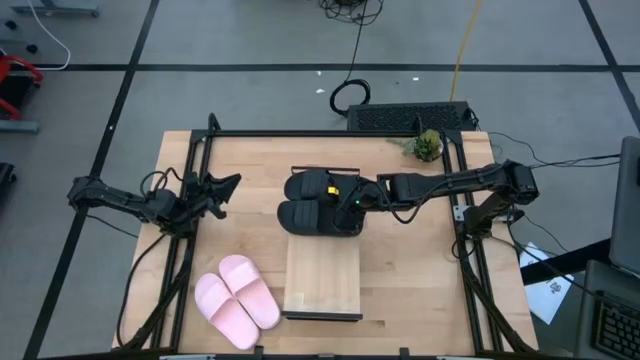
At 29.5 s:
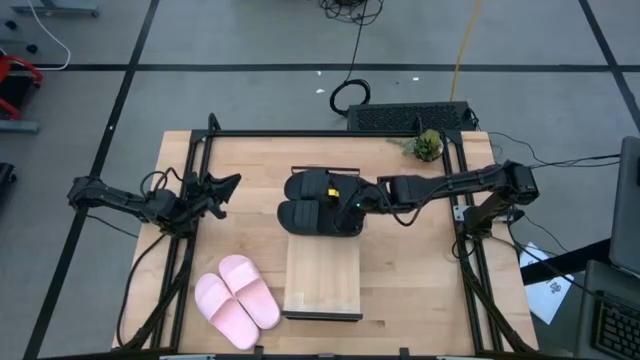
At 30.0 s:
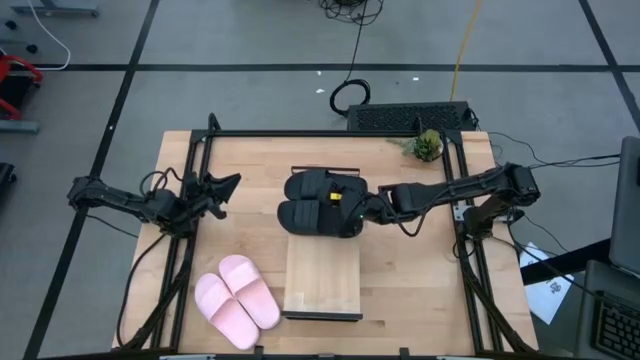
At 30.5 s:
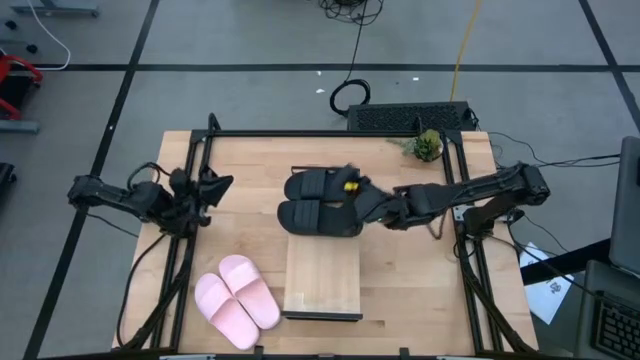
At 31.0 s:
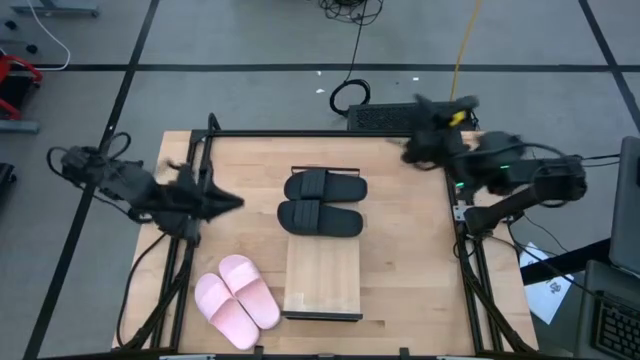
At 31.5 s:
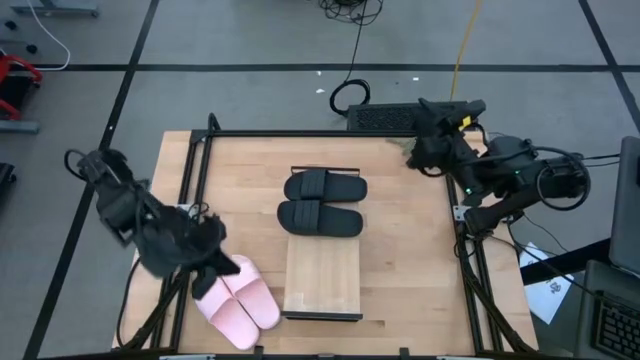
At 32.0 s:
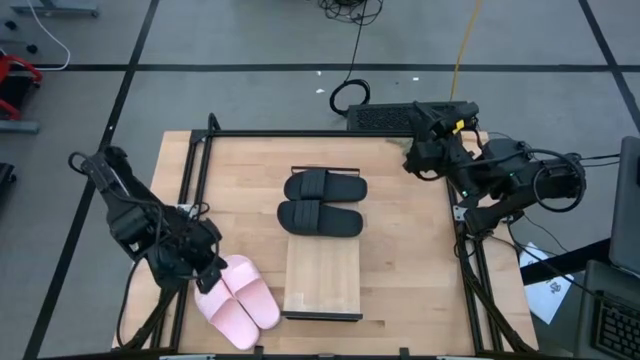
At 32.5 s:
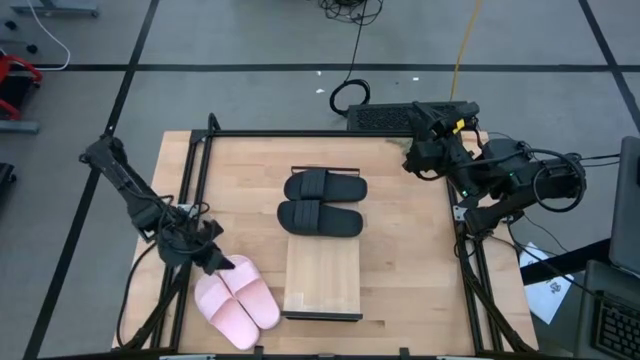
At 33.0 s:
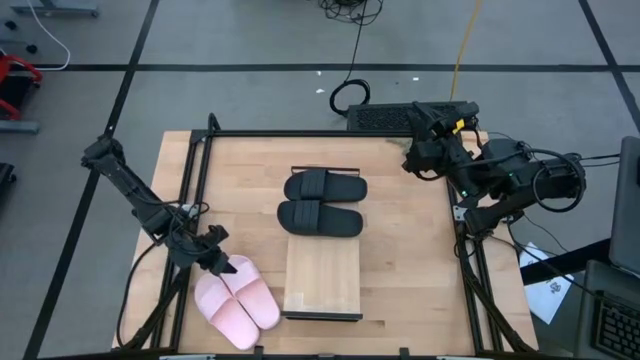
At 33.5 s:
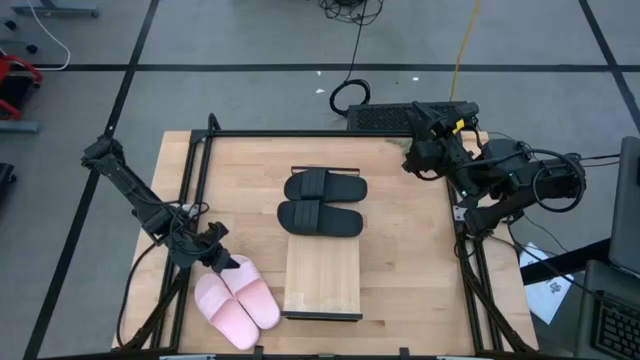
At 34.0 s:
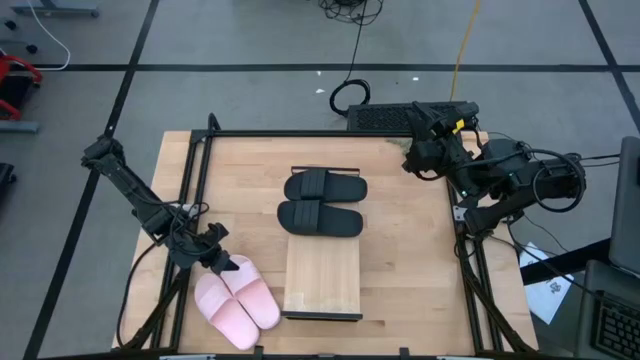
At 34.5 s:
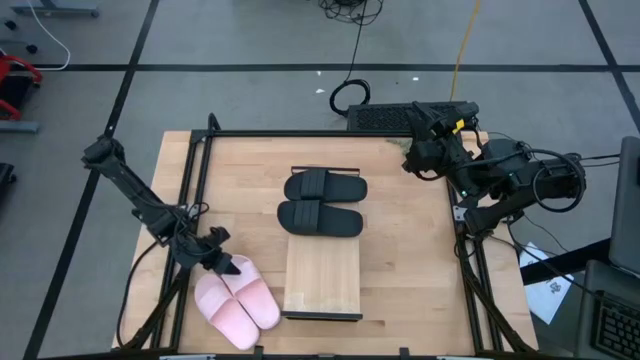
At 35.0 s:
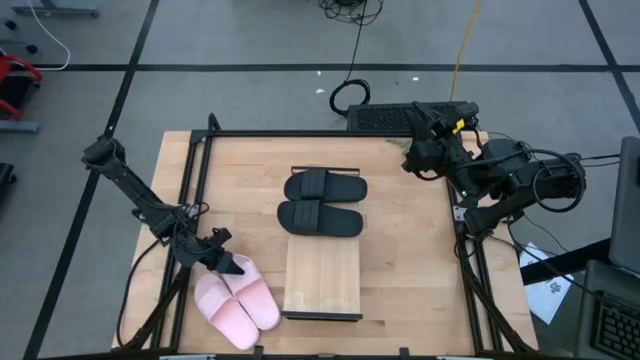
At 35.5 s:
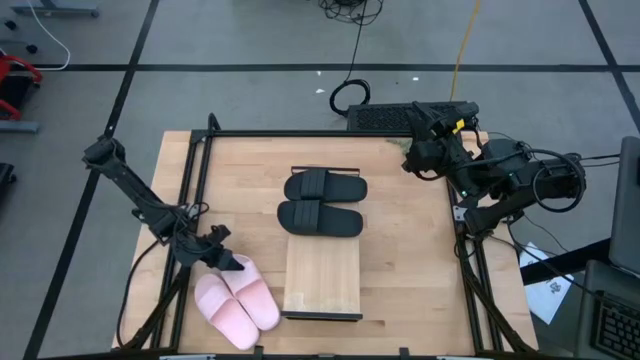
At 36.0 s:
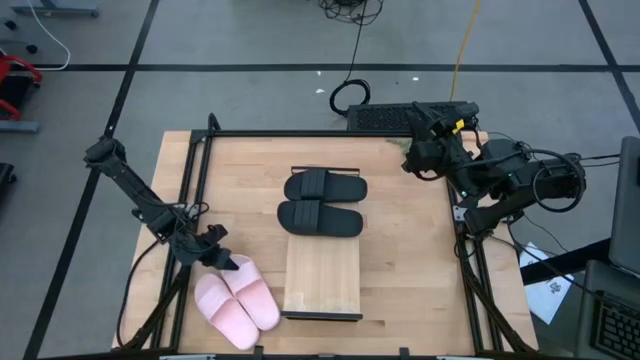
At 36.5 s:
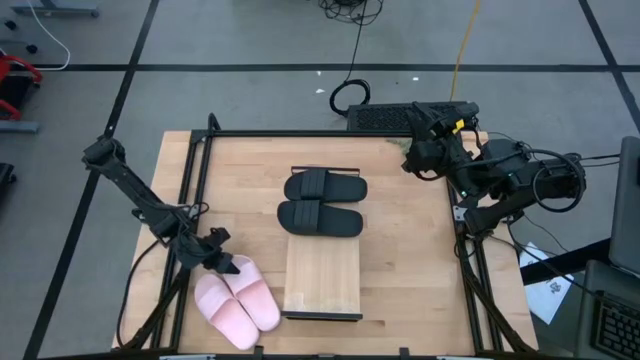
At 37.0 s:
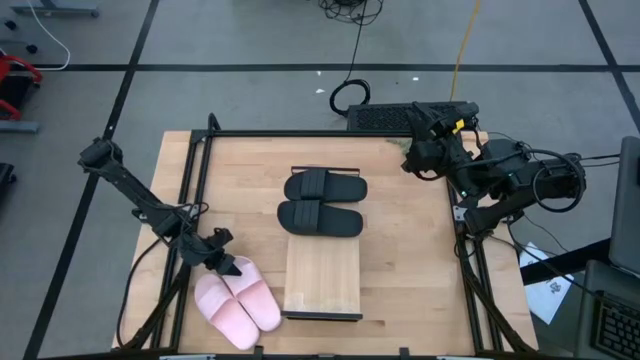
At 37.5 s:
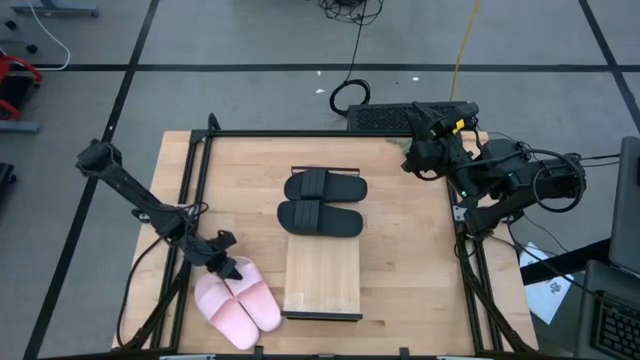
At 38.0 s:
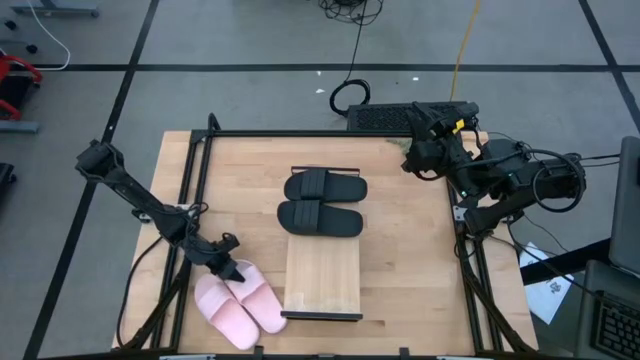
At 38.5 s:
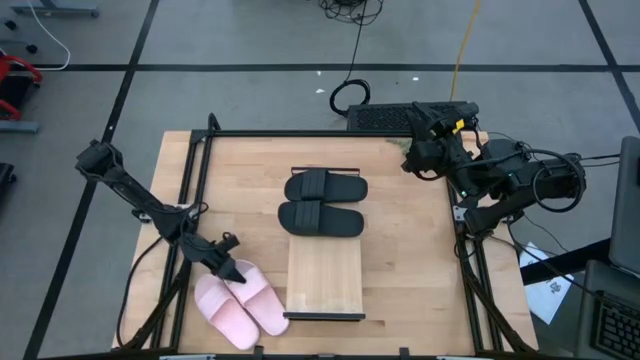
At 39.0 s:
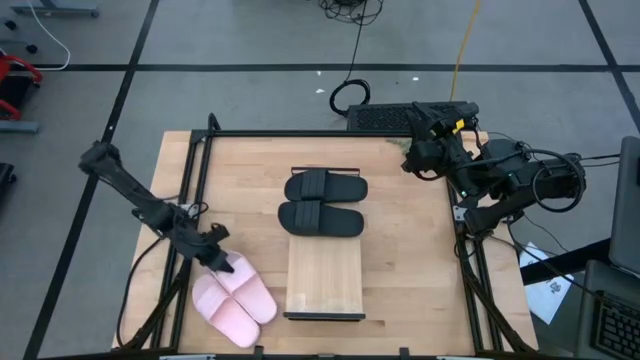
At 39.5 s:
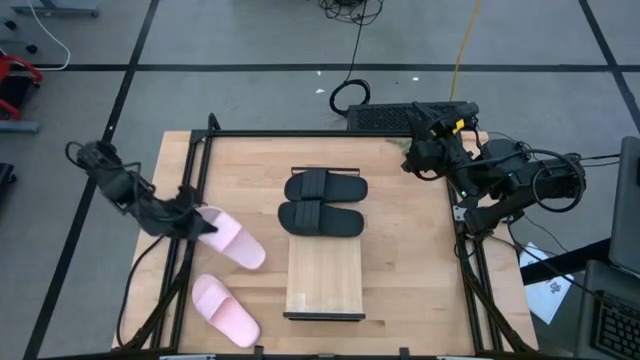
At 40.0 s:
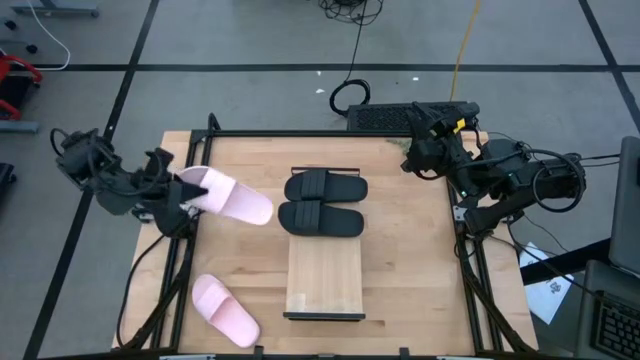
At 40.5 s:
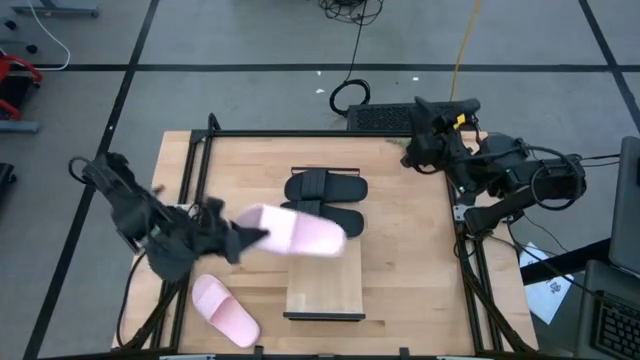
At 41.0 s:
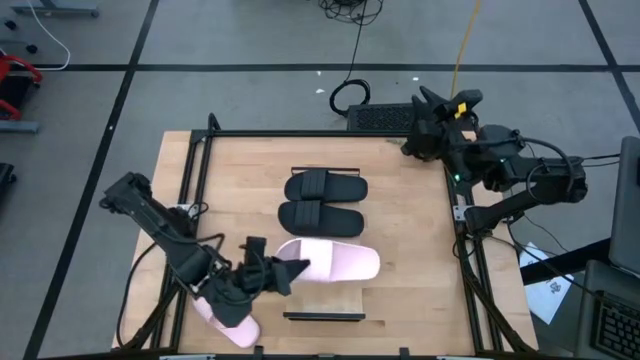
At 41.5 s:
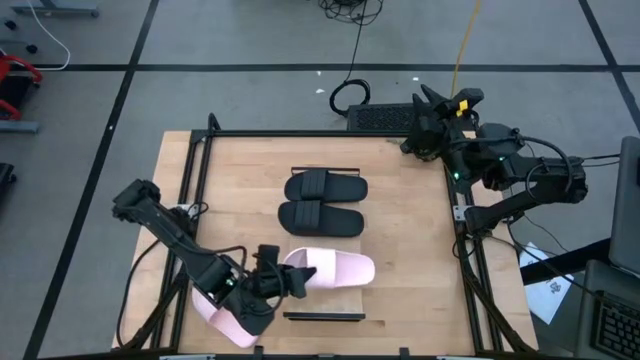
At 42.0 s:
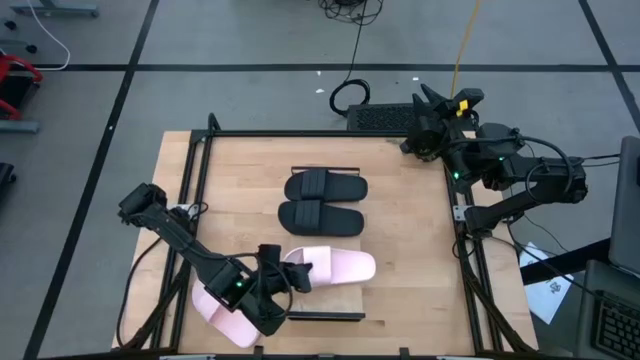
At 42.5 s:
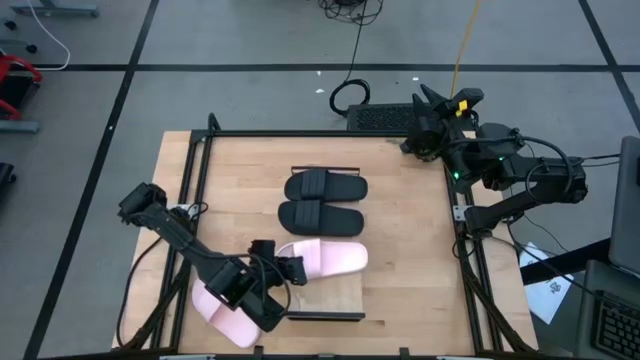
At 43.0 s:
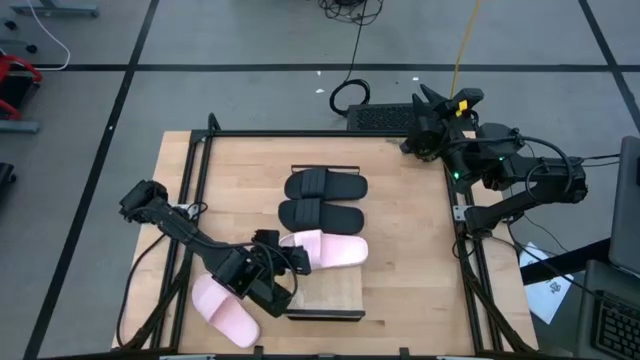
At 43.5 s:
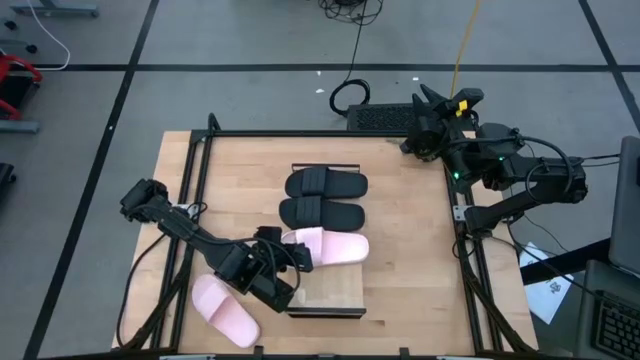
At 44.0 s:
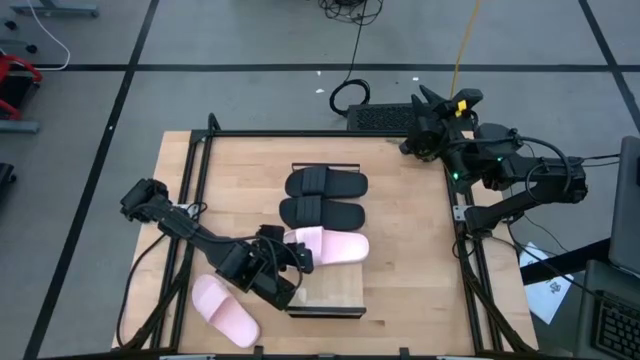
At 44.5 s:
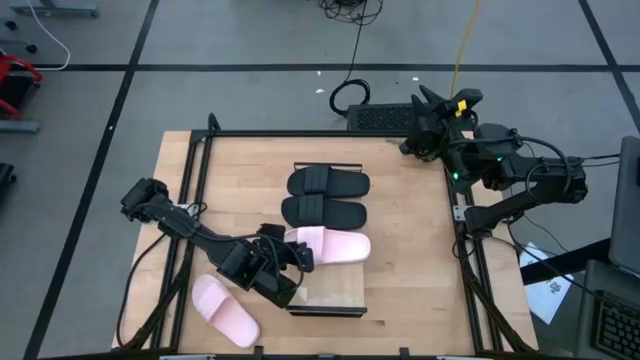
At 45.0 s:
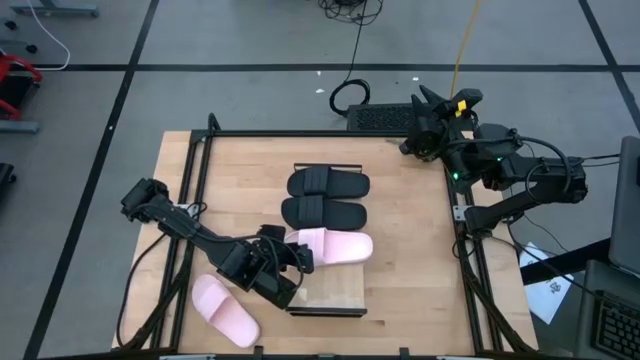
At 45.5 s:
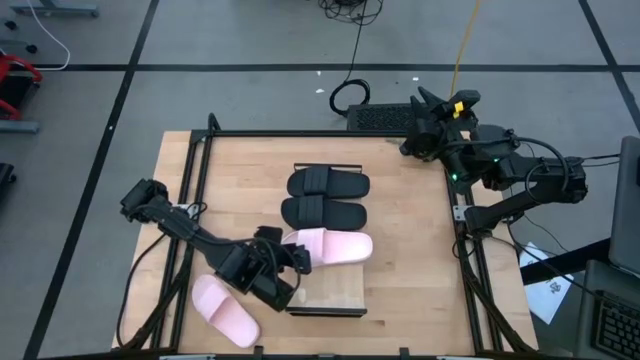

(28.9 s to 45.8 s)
Task: Pick and place slides into the shelf
Put the right pink slide on the shelf

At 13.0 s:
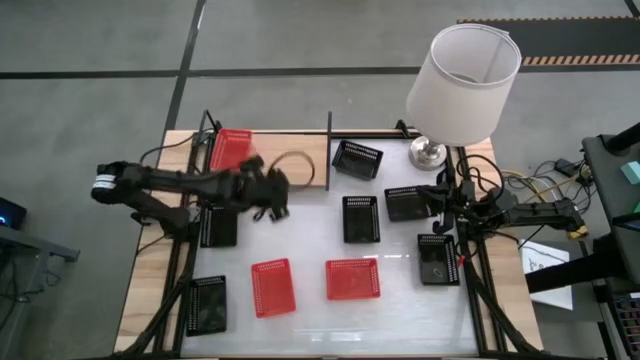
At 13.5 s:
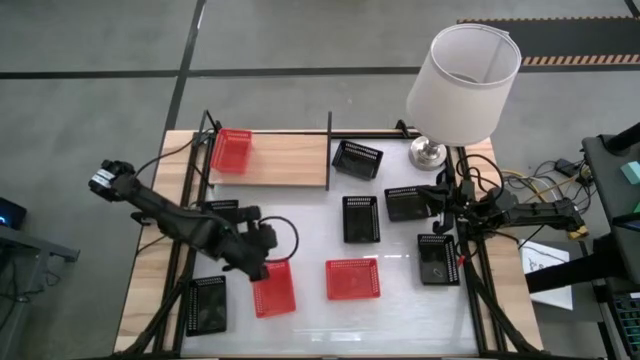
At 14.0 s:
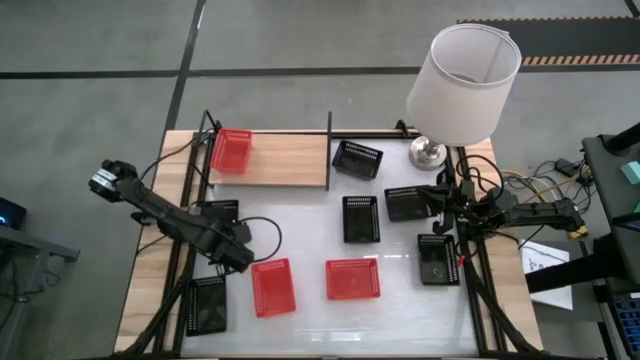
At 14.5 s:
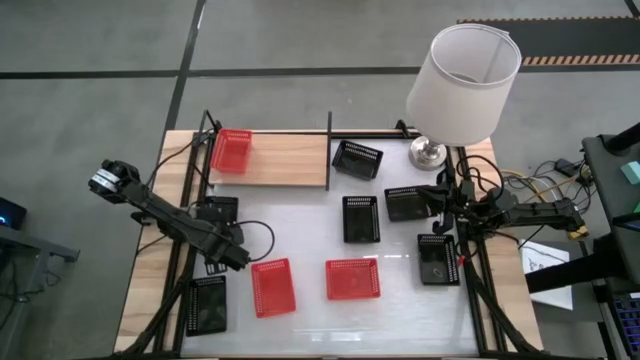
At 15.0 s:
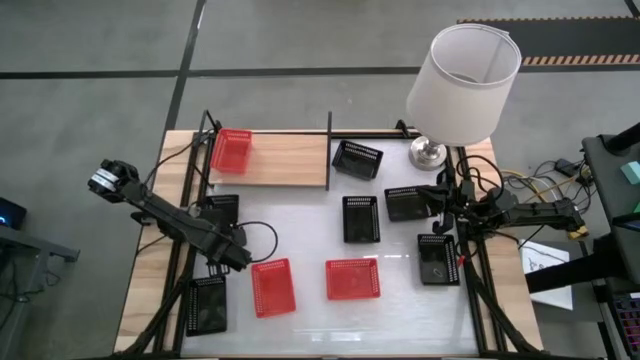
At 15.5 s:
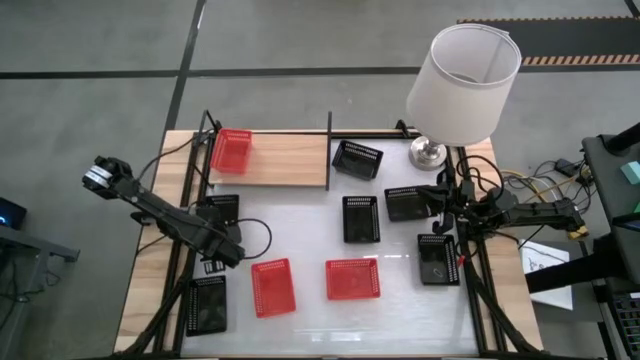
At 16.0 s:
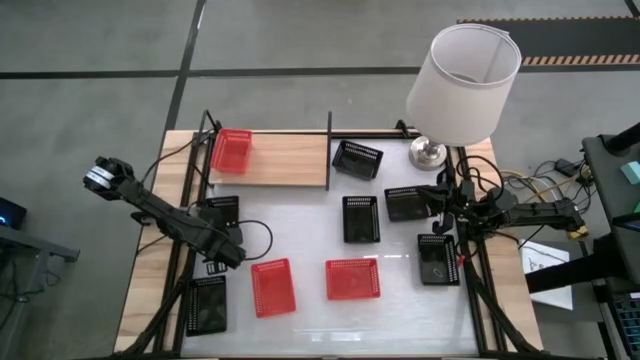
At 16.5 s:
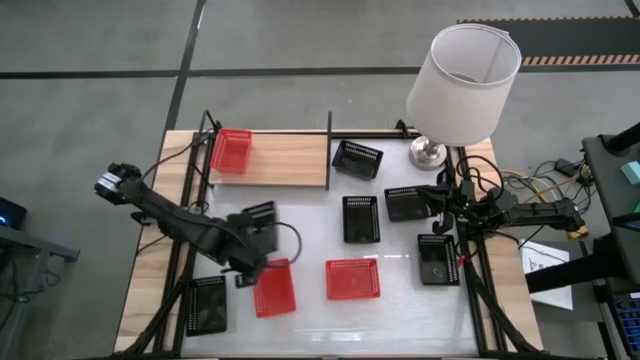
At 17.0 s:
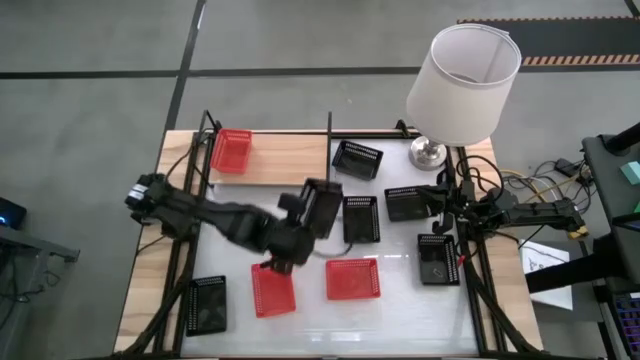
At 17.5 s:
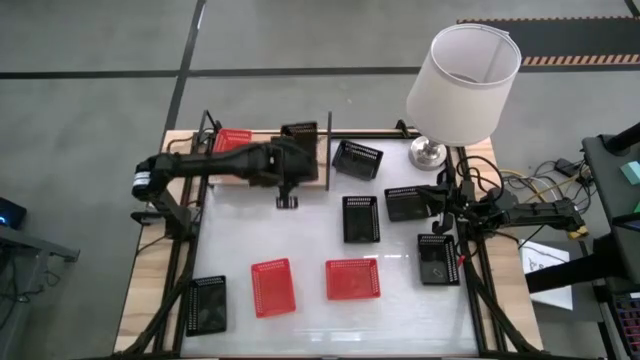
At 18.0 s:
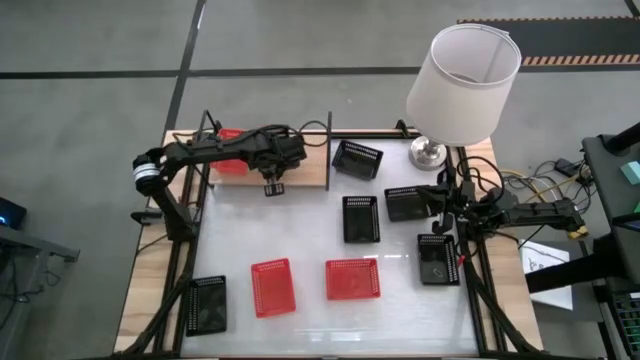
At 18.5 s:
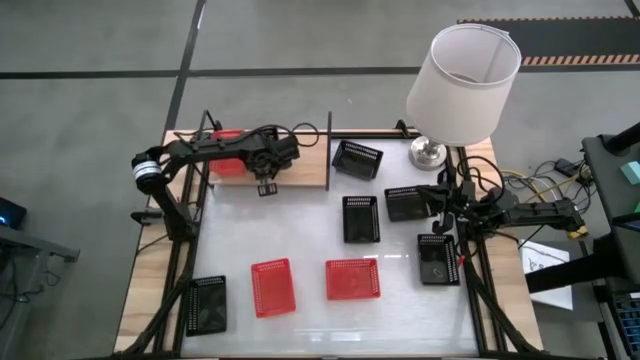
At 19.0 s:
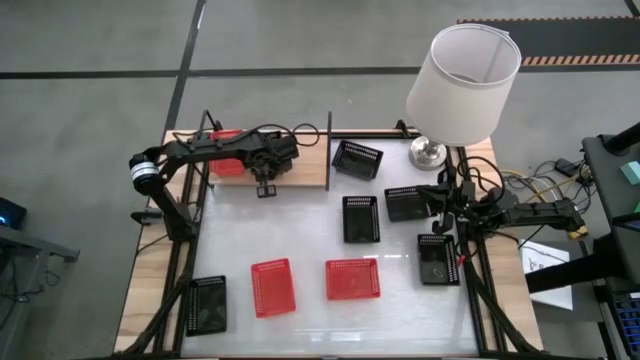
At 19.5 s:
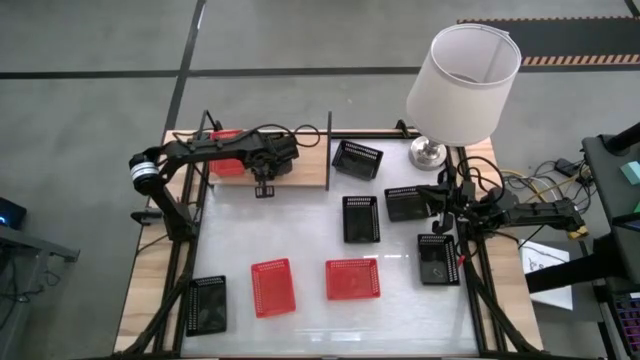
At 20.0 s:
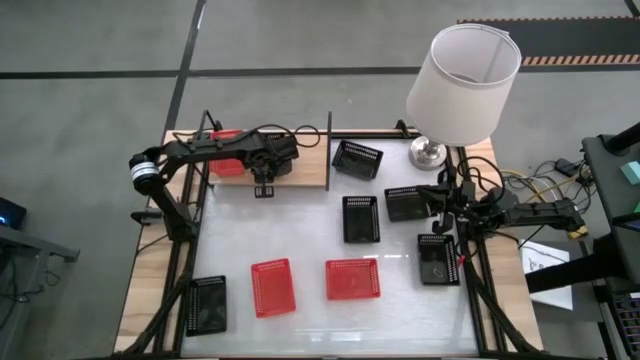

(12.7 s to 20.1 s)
Task: Stack baskets on shelf by color
Put the black basket on the shelf
